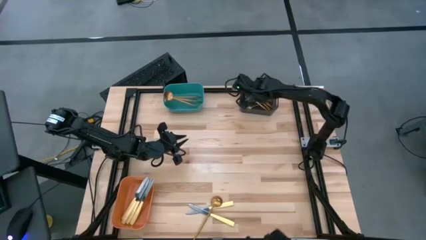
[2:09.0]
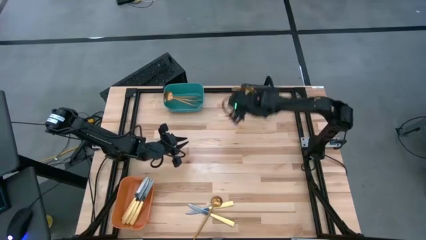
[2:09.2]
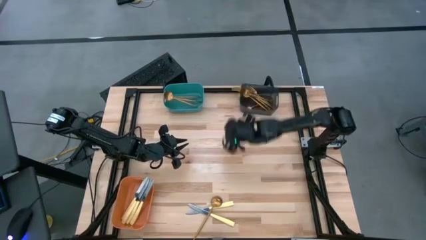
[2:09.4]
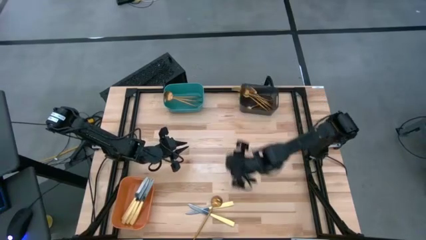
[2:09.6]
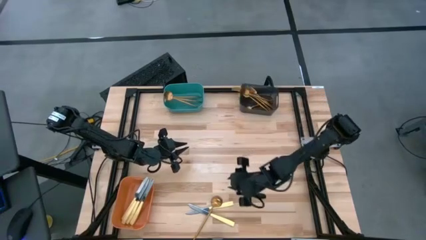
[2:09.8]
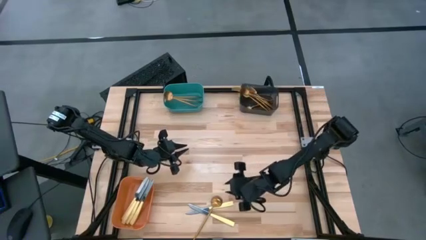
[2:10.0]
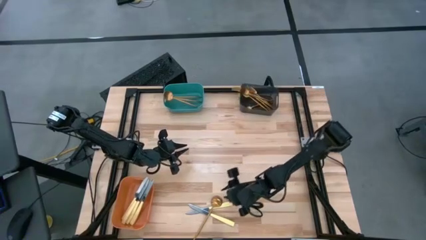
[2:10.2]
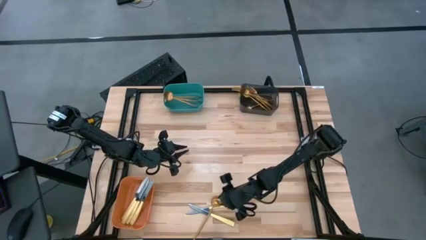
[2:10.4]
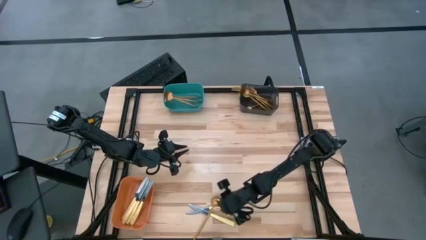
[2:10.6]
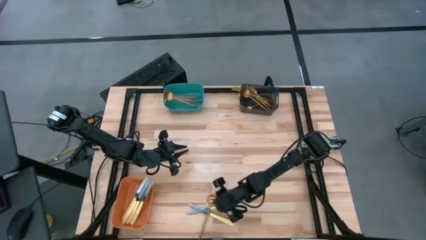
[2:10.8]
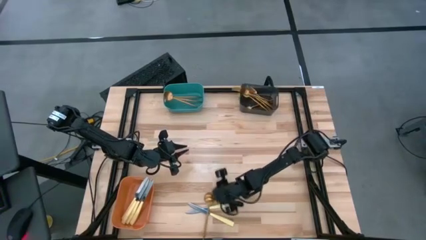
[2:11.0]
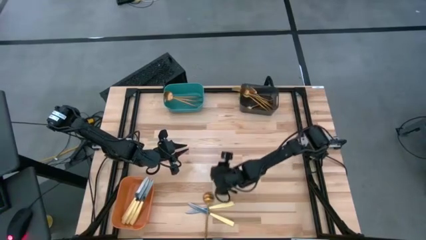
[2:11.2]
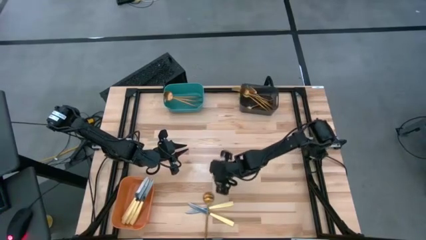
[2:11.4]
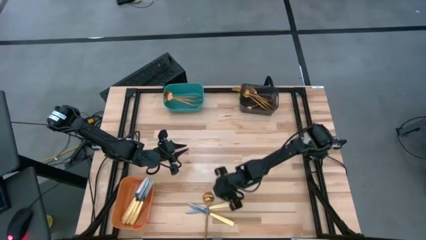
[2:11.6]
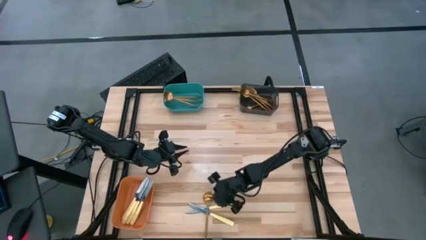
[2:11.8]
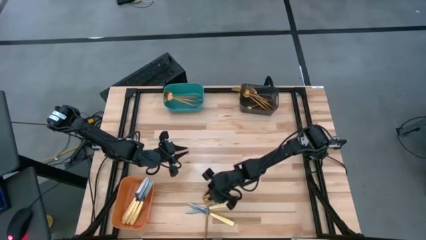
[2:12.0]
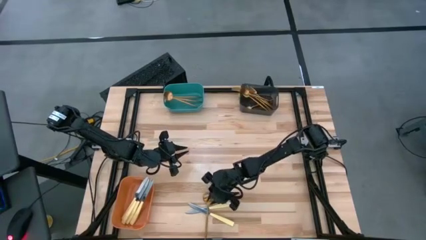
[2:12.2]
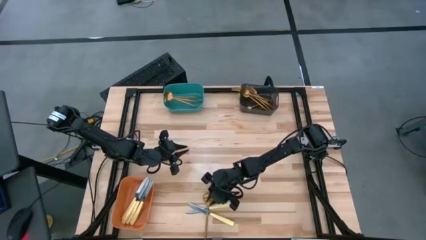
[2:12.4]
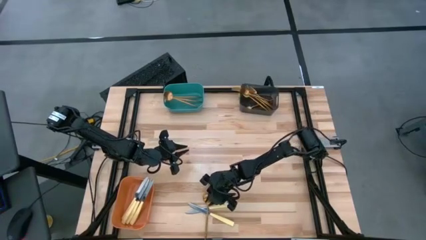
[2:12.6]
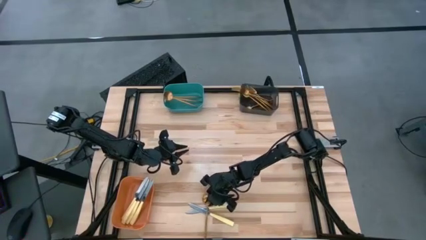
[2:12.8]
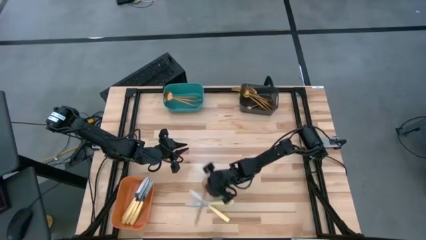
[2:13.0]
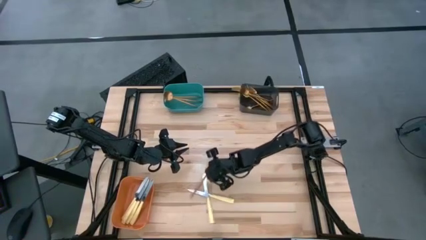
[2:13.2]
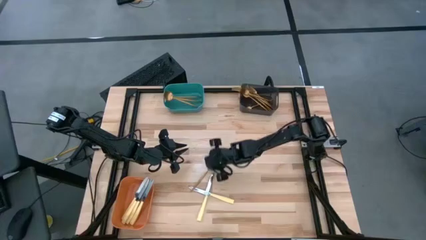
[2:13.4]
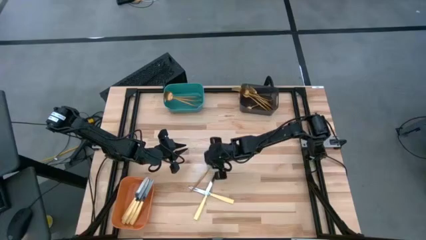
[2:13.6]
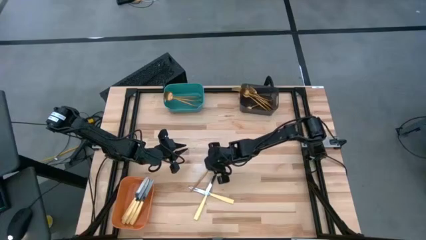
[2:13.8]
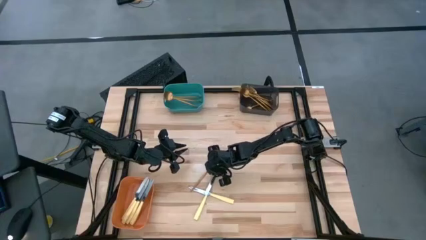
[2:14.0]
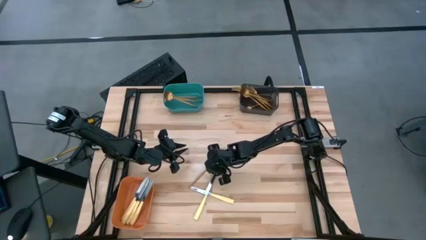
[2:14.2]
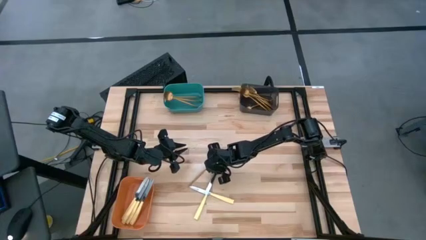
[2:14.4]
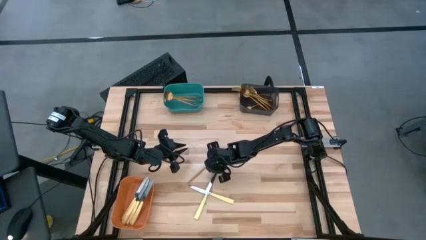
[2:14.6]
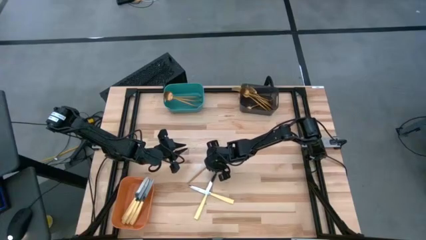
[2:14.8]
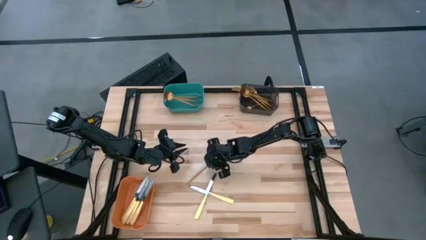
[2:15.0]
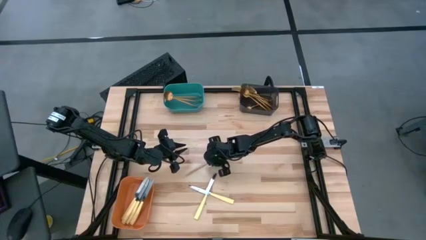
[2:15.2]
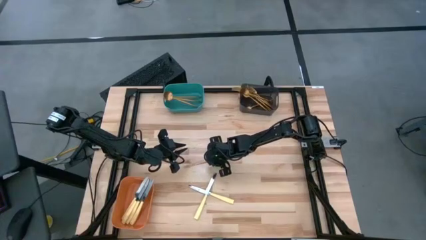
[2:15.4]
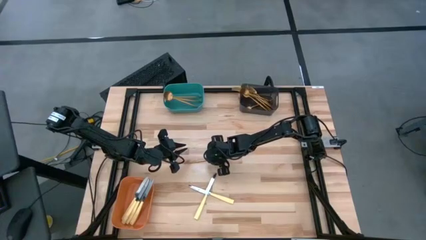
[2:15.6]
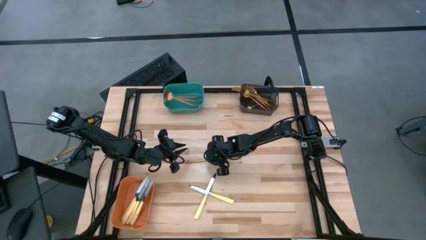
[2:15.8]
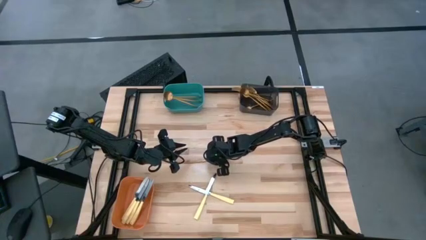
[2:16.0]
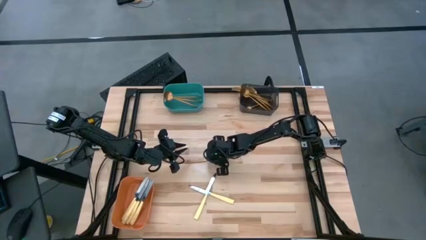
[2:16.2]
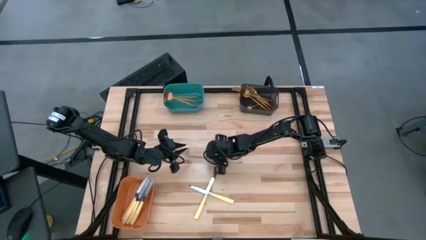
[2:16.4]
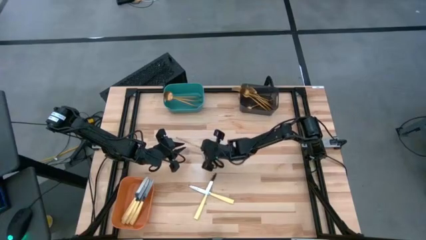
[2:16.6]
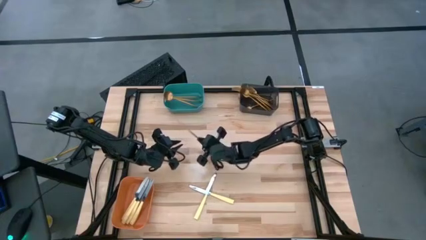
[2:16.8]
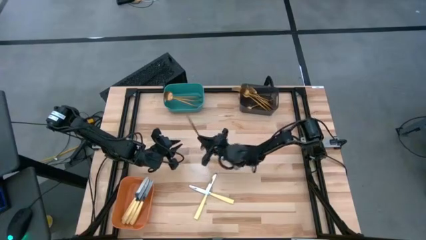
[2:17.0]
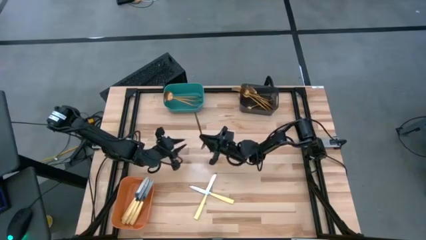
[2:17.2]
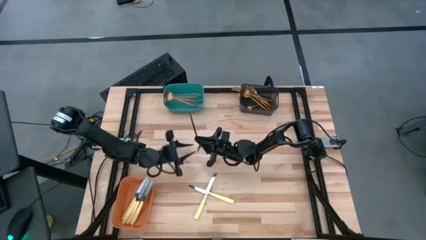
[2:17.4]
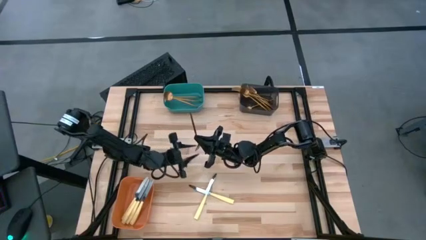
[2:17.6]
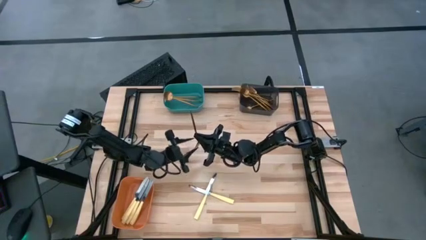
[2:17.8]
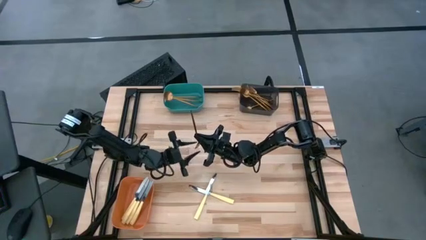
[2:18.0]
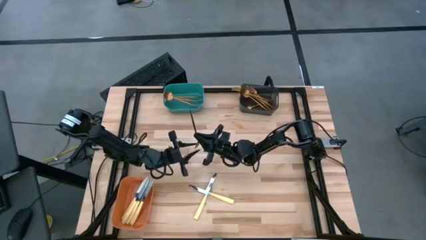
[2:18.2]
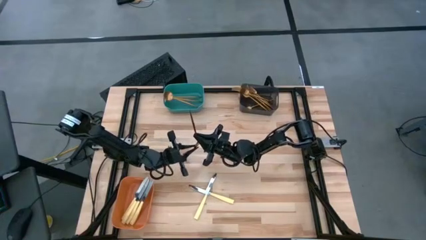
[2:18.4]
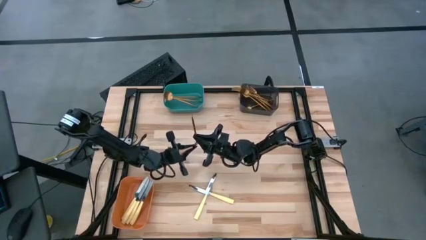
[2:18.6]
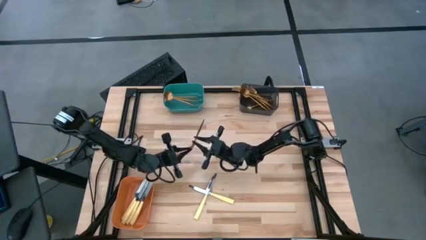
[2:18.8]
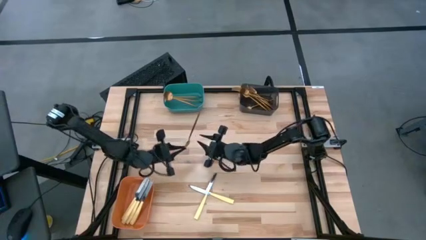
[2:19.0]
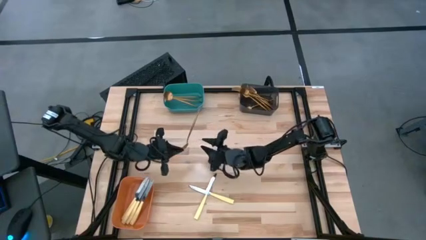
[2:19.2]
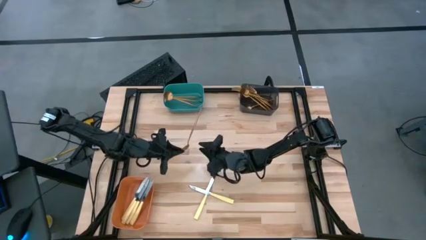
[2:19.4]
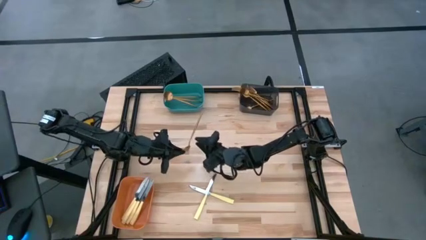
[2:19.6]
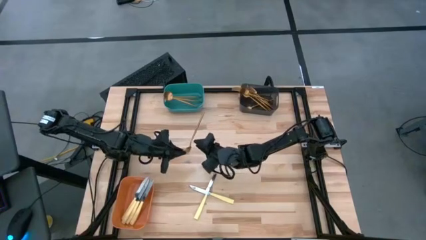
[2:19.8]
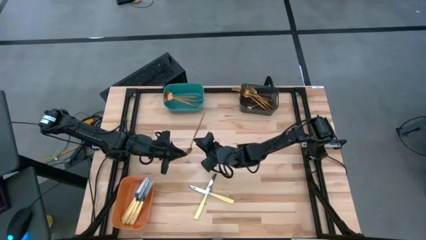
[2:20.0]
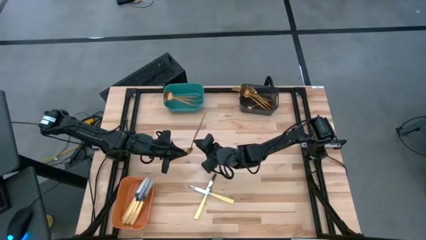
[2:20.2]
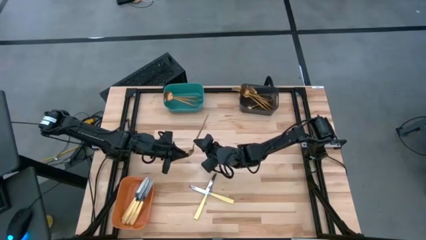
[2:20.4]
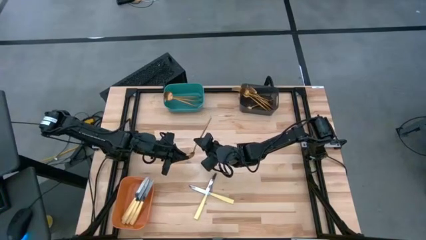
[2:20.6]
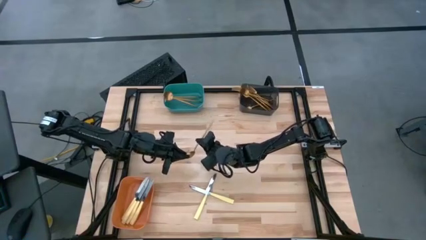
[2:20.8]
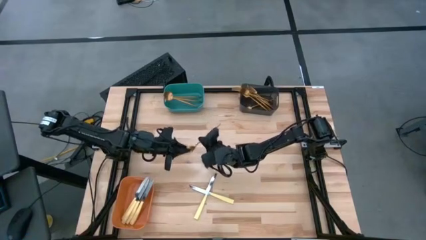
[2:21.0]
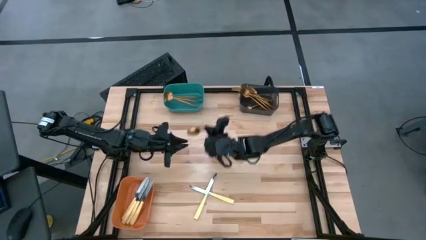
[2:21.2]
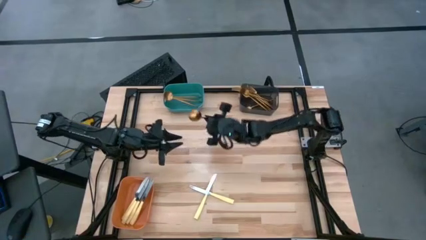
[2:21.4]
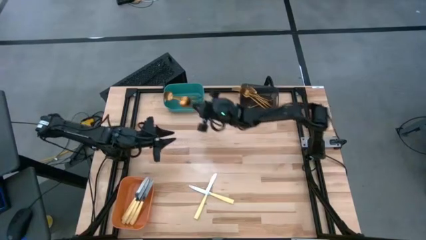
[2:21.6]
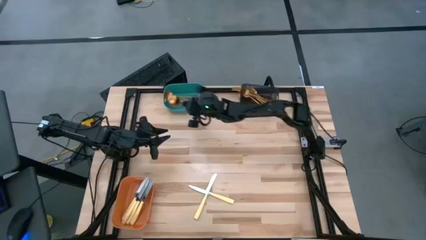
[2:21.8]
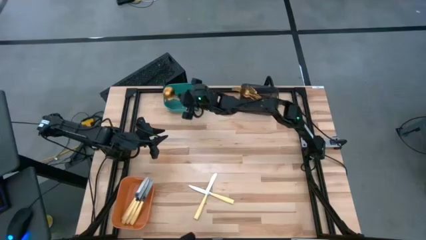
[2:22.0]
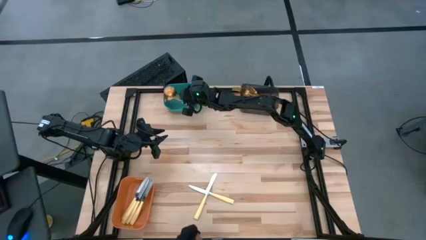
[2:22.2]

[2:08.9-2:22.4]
Task: Sort silverware by color (type)
Put the gold spoon into the green bin

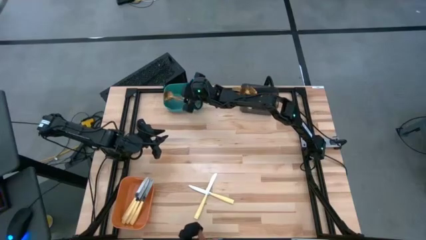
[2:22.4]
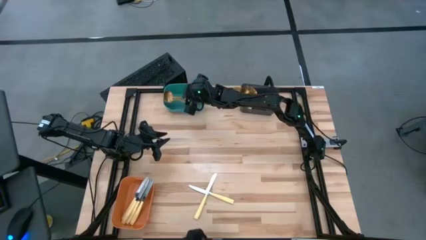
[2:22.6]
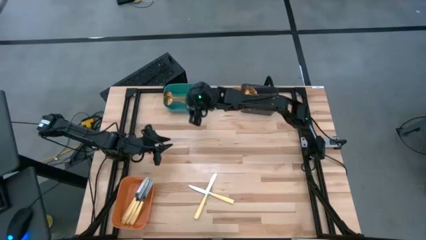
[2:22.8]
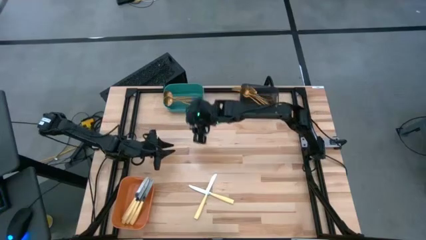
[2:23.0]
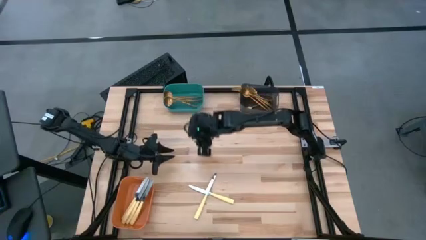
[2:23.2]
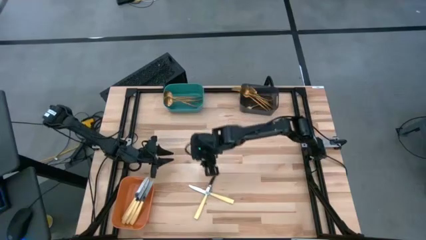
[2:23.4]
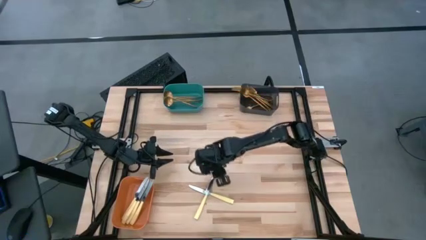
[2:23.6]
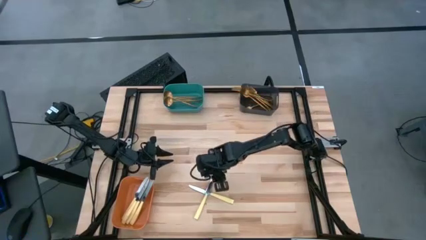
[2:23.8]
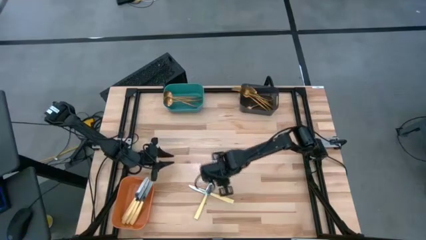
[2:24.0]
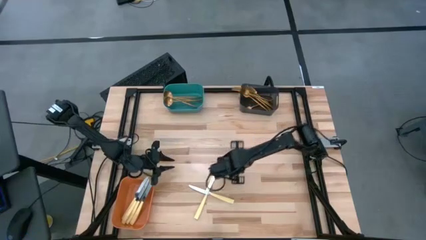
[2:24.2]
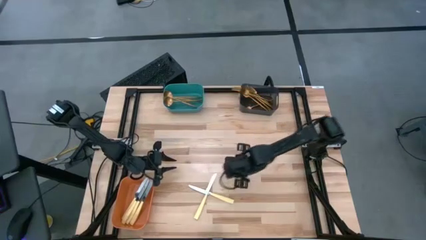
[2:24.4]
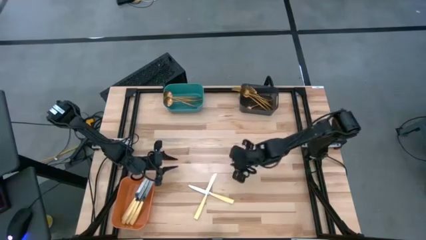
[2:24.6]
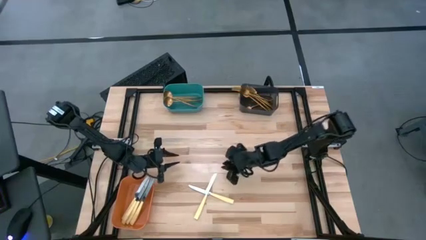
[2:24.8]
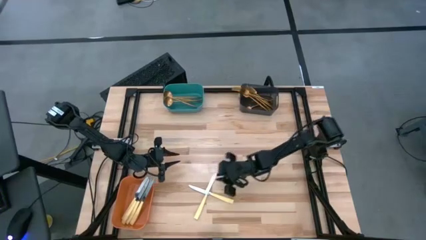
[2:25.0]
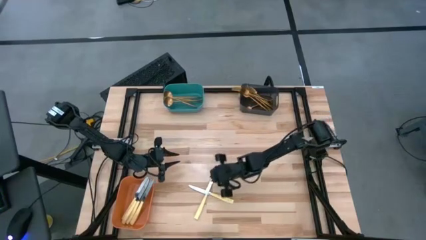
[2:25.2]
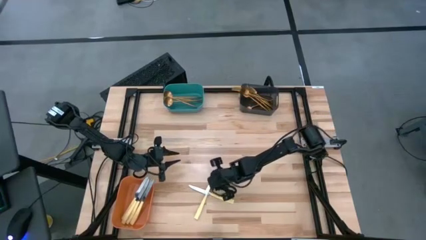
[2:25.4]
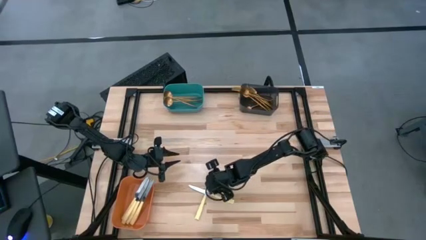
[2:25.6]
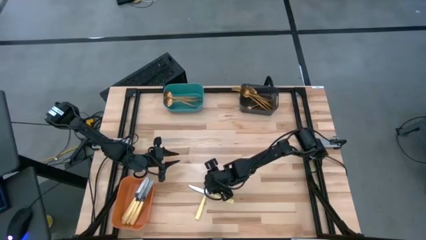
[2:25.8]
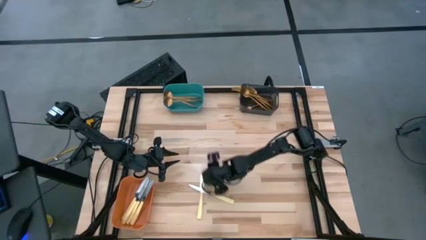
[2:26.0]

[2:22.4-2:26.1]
Adjust the yellow table knife
